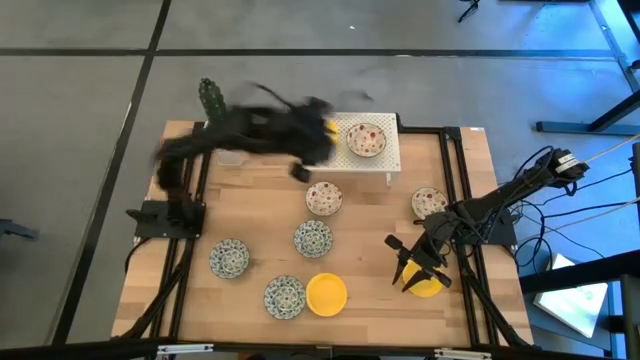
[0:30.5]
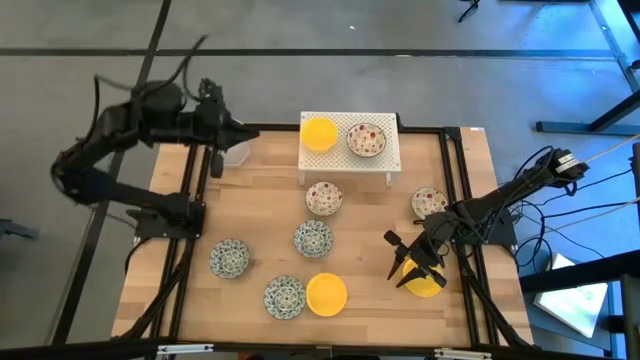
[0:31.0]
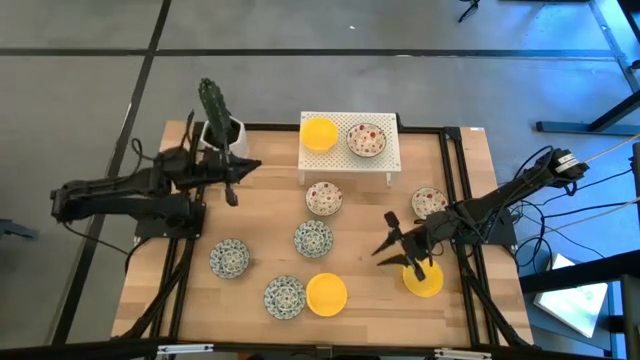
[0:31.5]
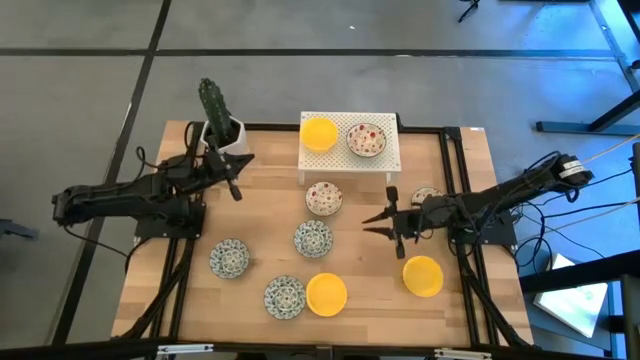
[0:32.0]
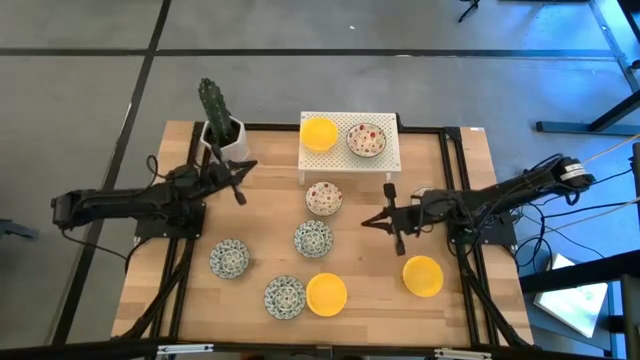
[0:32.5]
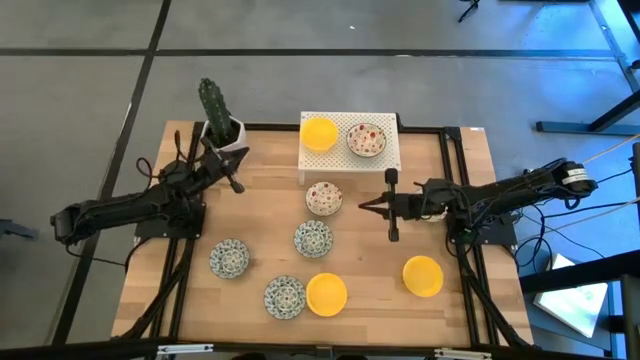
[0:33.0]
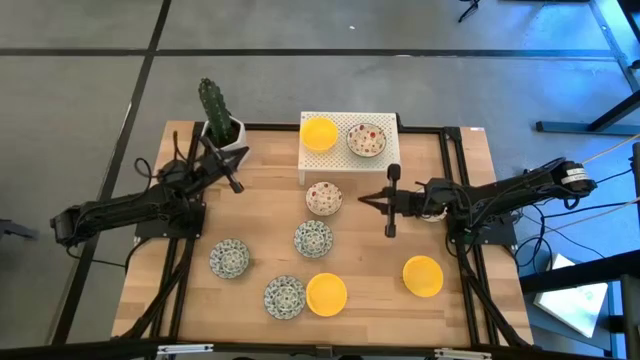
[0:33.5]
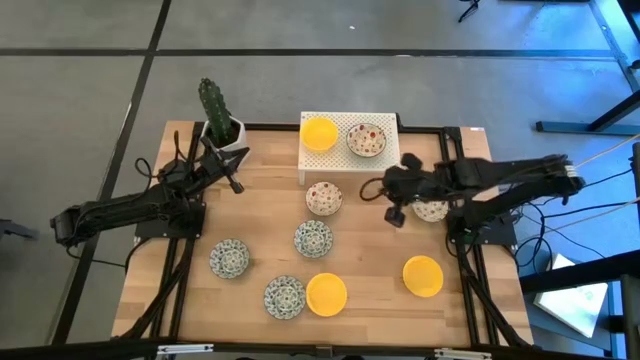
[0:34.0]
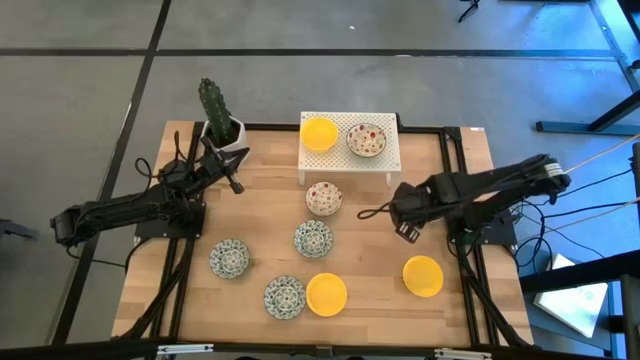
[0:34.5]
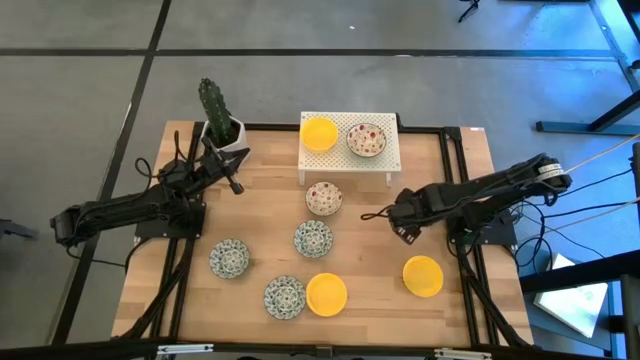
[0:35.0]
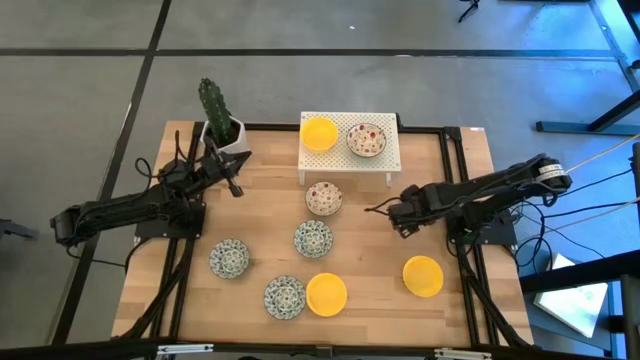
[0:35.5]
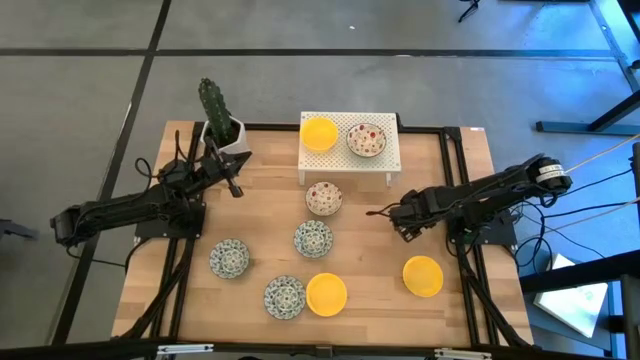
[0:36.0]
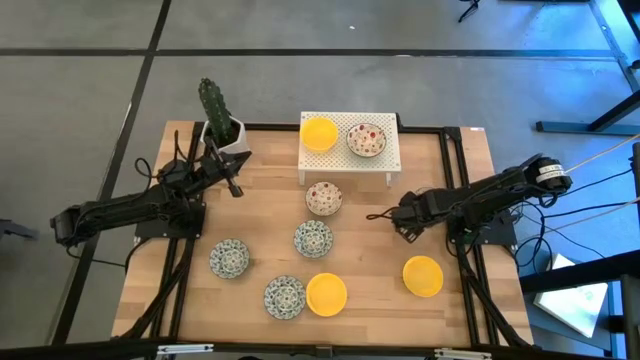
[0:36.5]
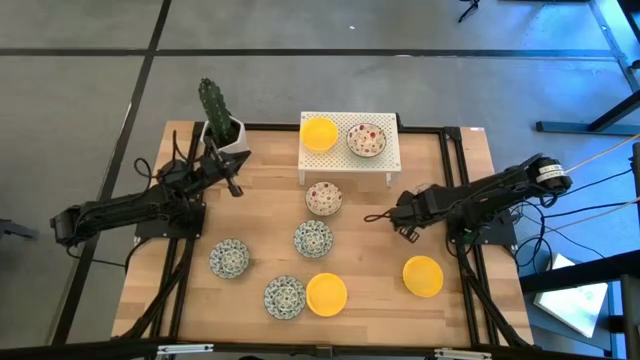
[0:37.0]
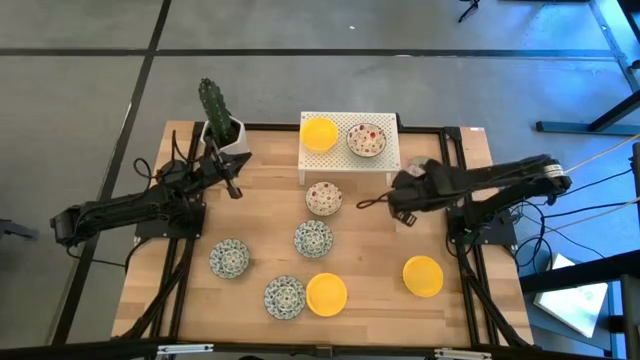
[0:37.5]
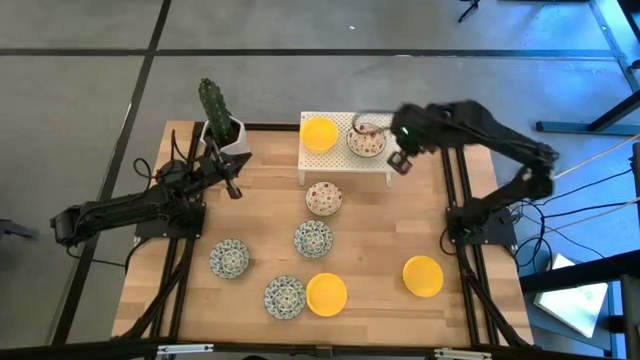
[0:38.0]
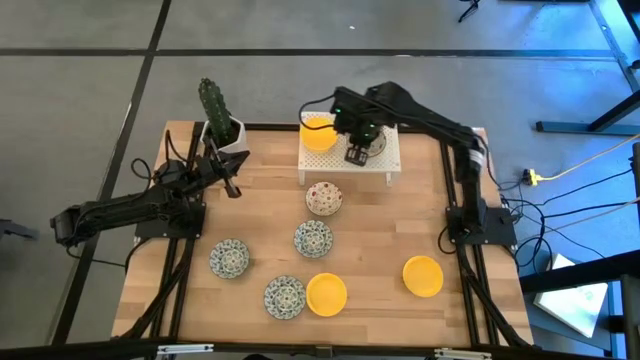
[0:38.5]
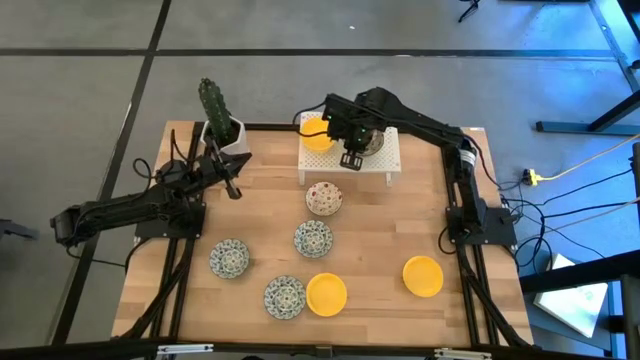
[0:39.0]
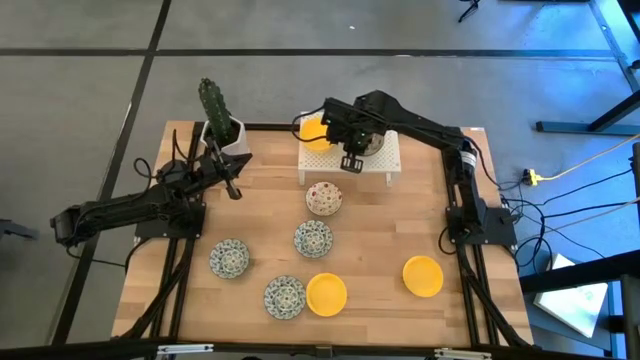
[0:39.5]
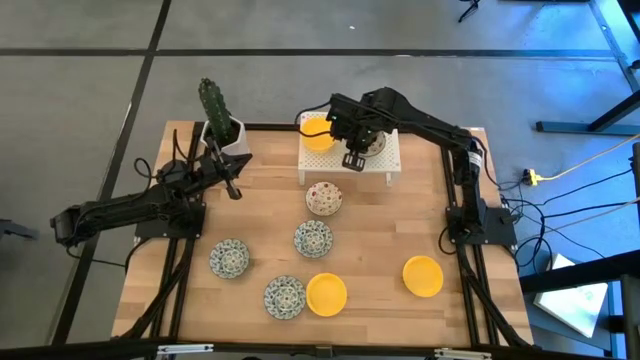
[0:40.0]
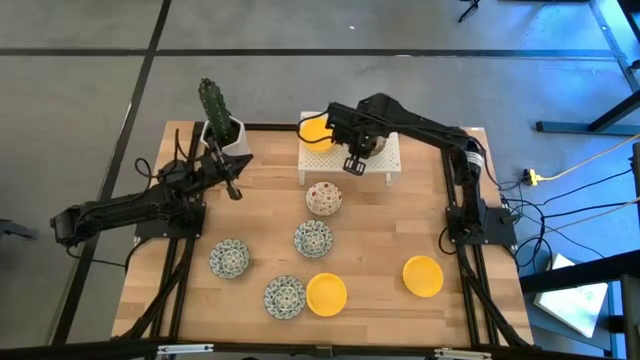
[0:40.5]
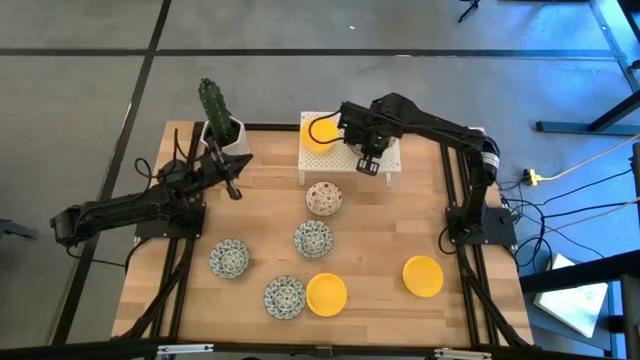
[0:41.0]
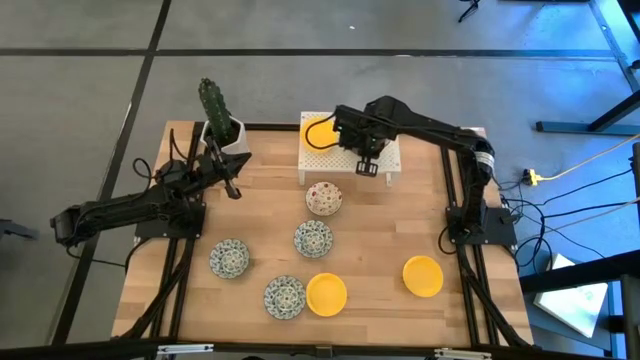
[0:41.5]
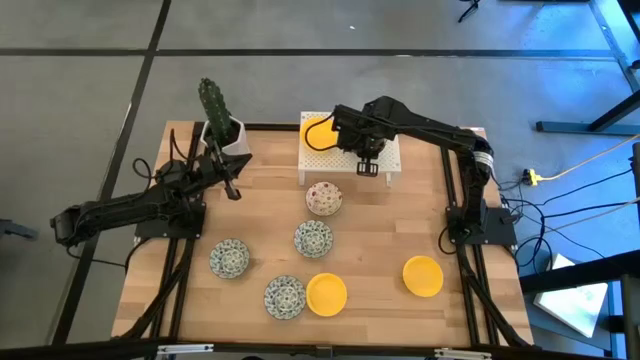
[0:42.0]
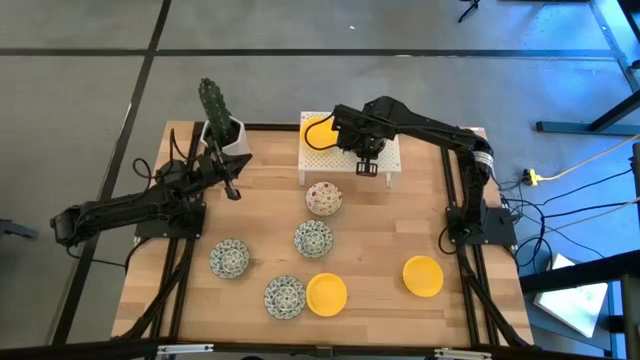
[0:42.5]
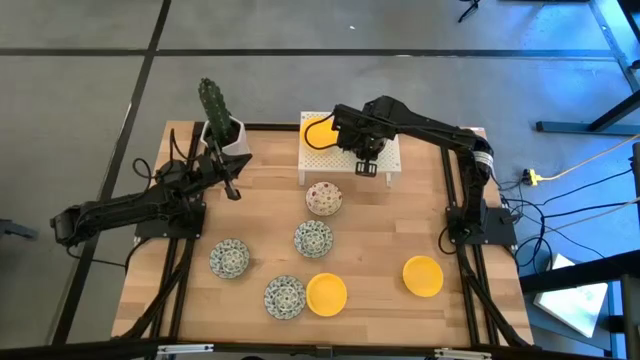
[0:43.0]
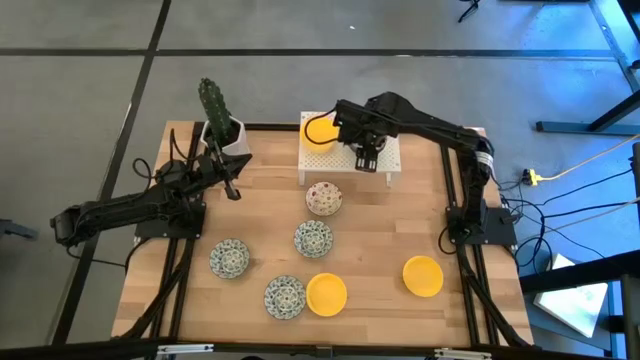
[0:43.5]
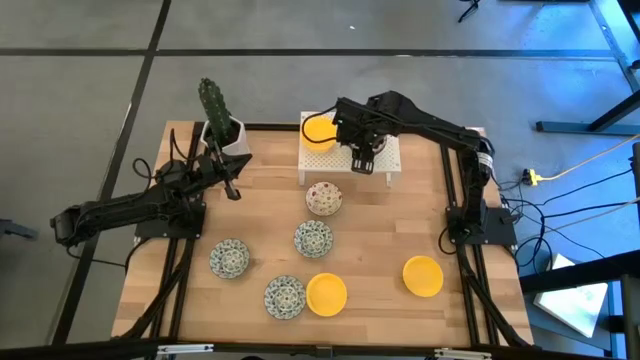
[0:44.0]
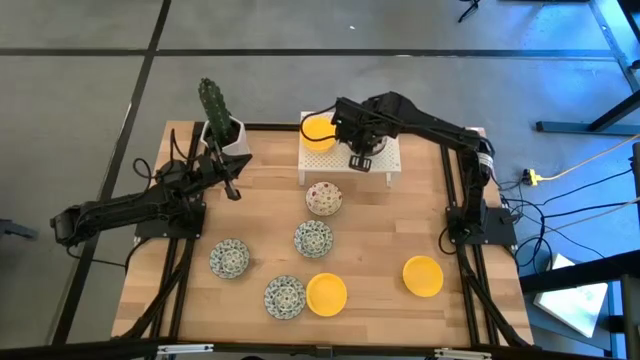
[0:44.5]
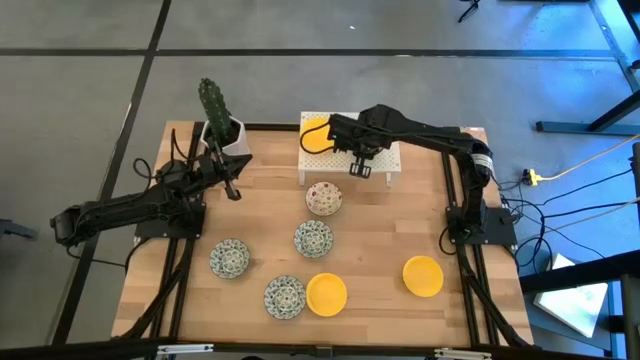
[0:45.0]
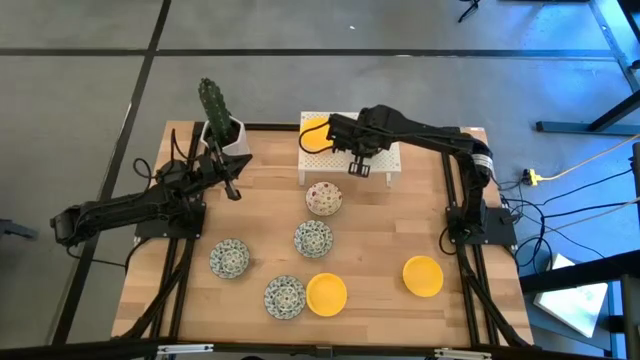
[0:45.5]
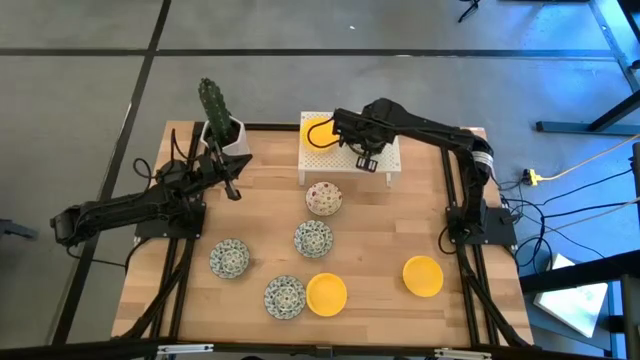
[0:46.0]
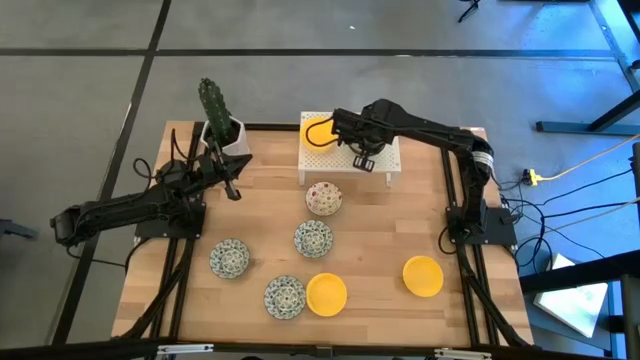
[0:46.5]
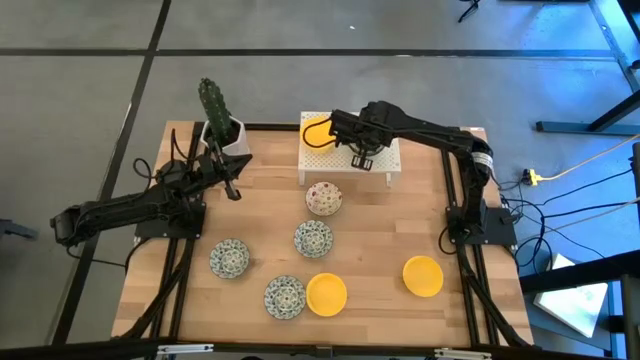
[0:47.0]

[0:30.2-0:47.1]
Task: Pick & Place Mini bowls
Stack the right green bowl on top of the green bowl on the shelf

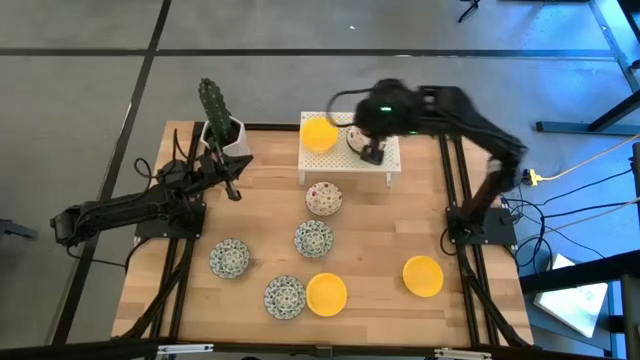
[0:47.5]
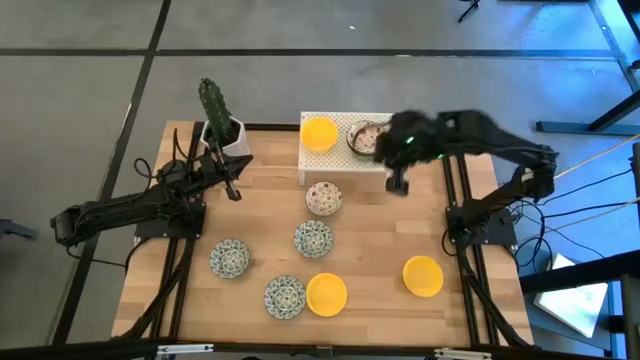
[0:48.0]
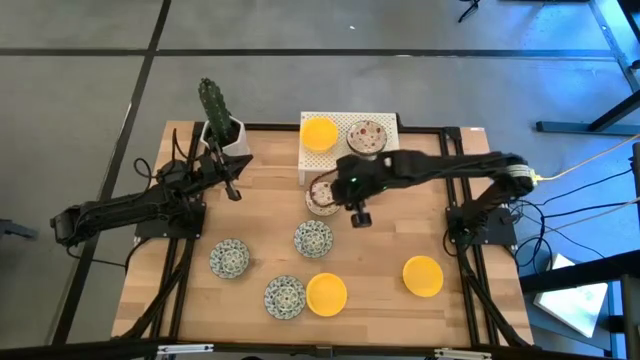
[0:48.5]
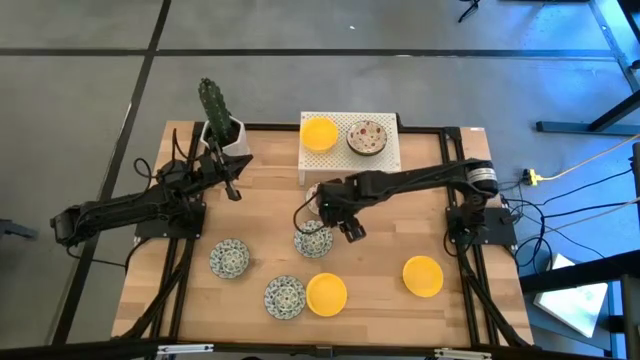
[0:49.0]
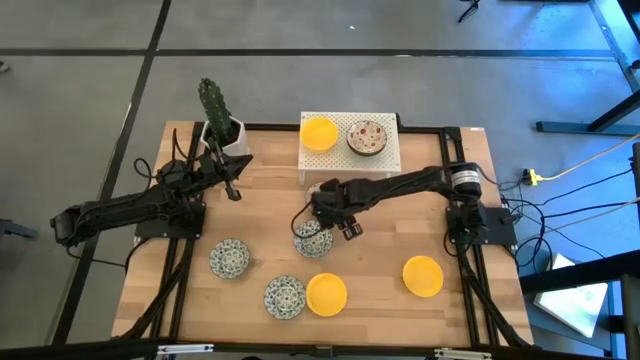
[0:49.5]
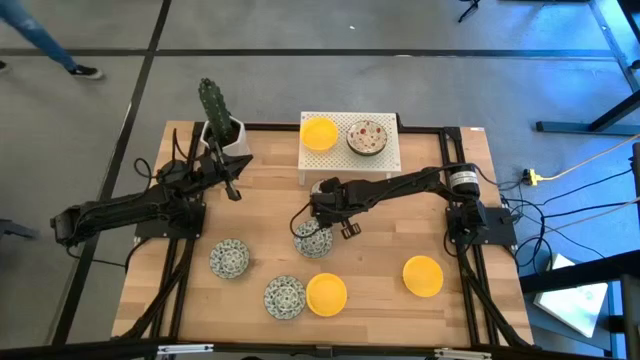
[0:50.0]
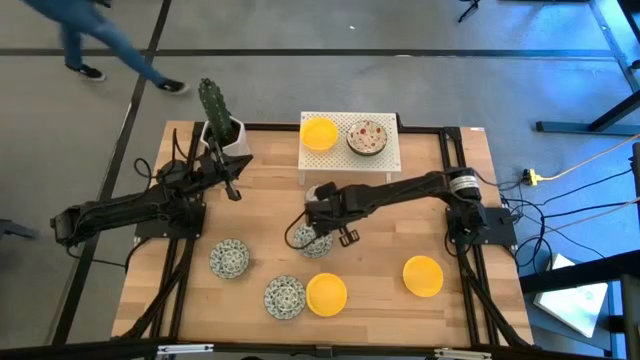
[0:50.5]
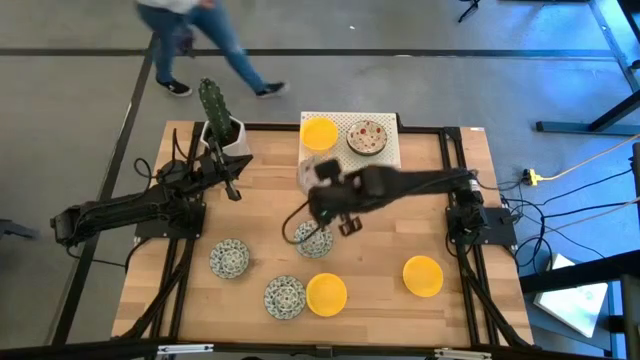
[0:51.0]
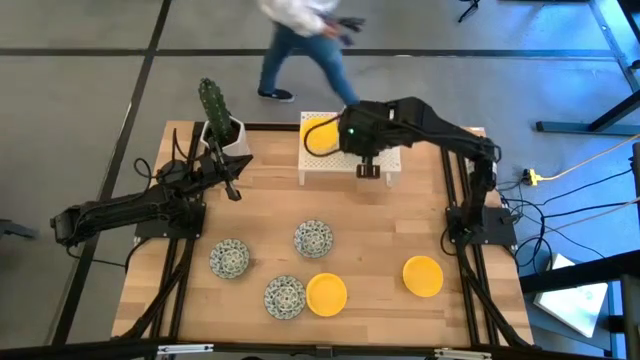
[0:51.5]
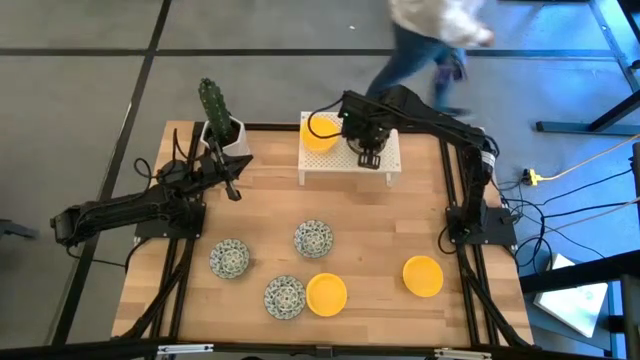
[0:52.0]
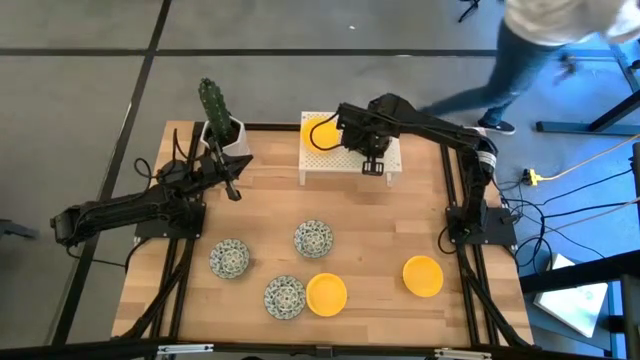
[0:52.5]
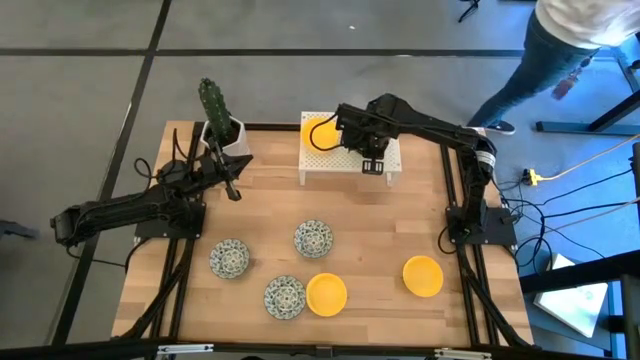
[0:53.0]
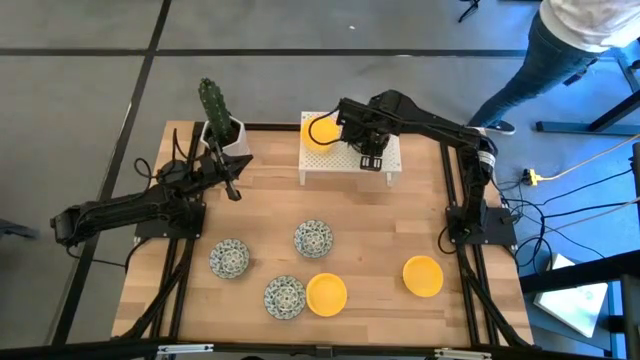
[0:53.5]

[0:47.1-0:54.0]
Stack the green bowl on top of the green bowl on the shelf
